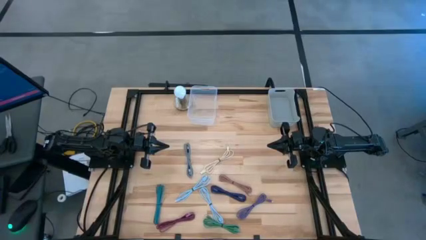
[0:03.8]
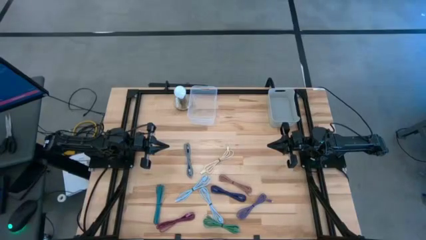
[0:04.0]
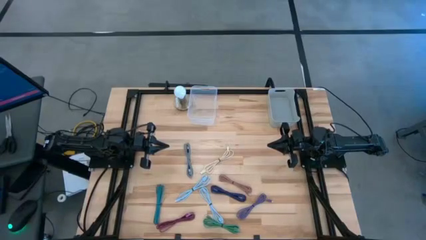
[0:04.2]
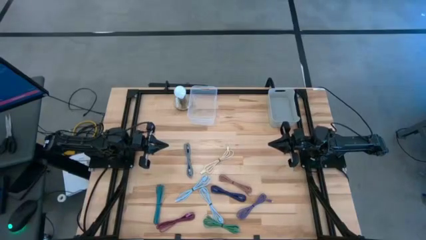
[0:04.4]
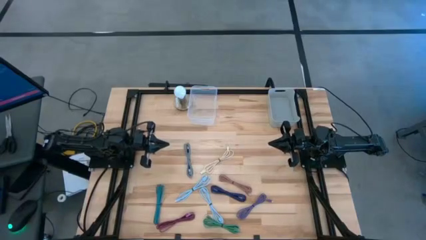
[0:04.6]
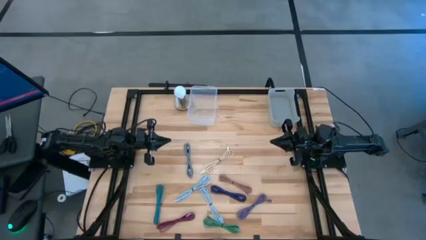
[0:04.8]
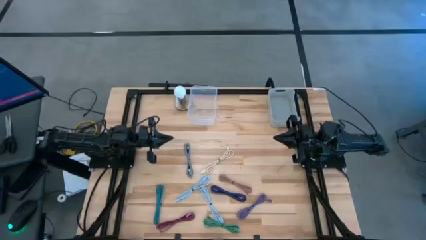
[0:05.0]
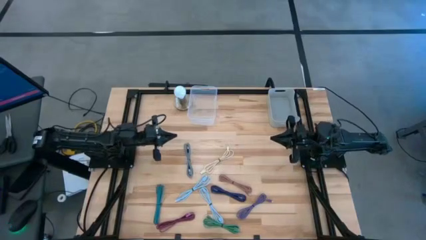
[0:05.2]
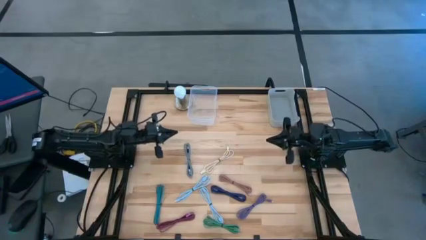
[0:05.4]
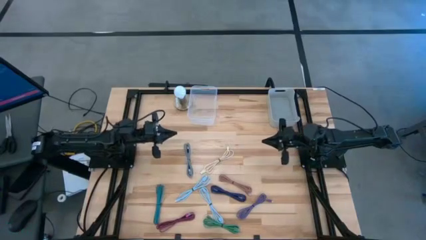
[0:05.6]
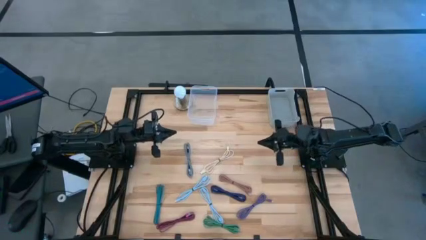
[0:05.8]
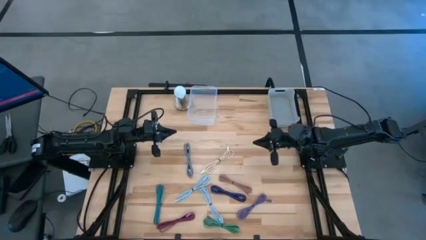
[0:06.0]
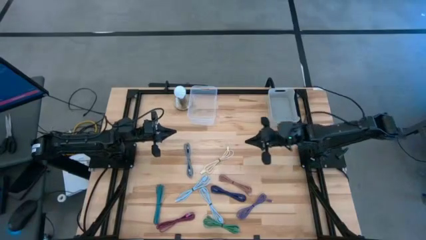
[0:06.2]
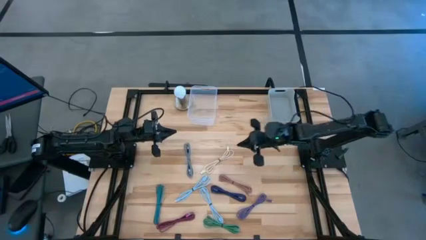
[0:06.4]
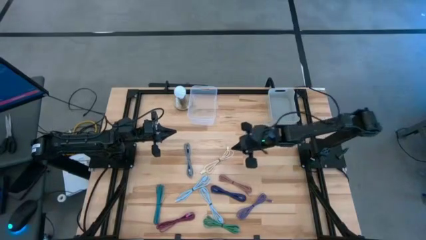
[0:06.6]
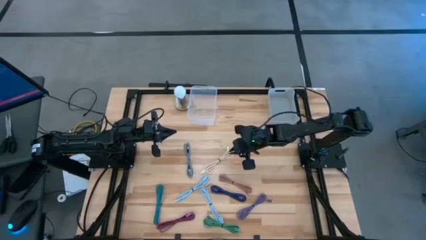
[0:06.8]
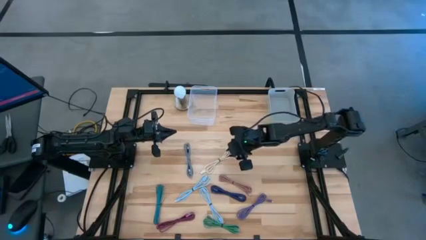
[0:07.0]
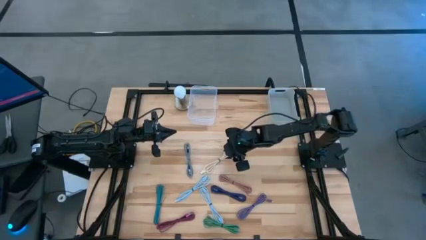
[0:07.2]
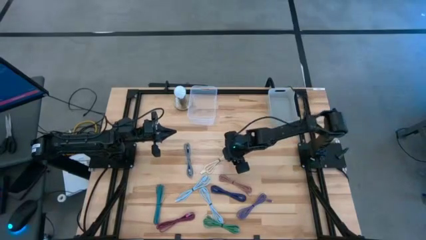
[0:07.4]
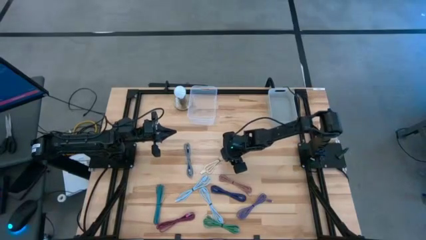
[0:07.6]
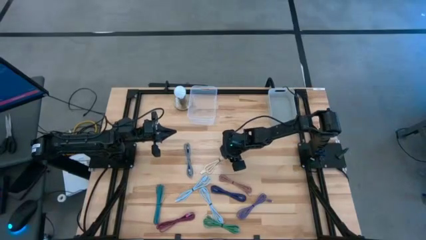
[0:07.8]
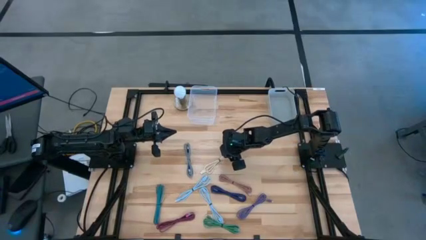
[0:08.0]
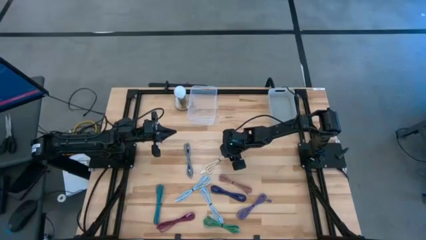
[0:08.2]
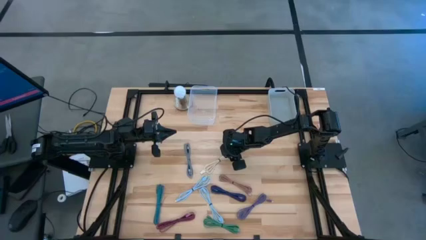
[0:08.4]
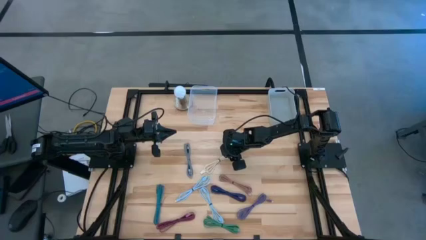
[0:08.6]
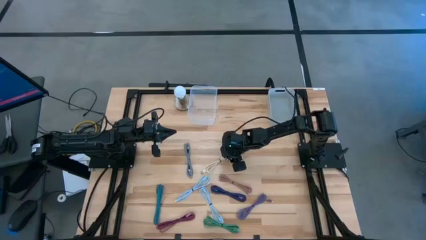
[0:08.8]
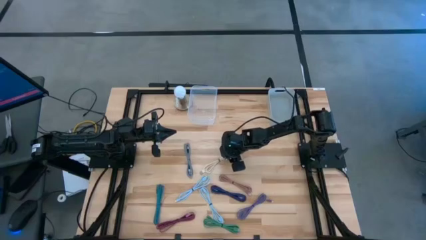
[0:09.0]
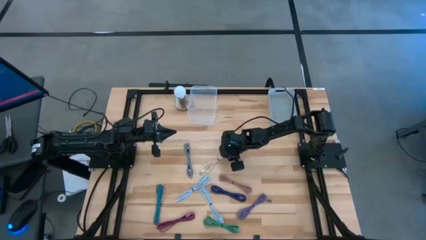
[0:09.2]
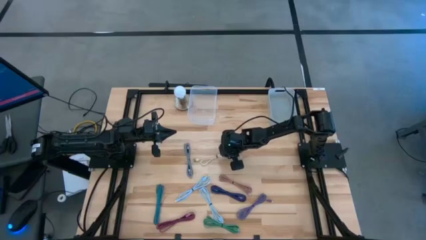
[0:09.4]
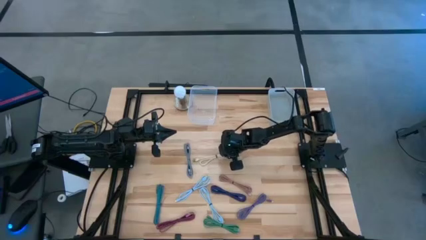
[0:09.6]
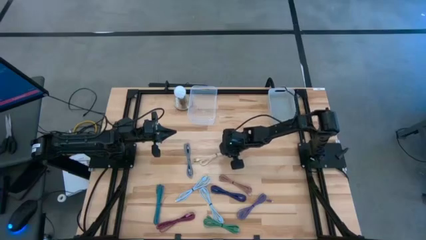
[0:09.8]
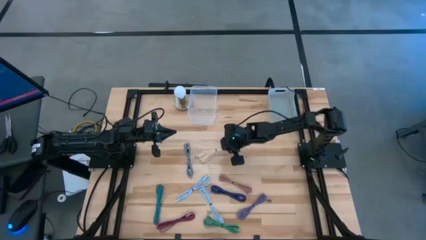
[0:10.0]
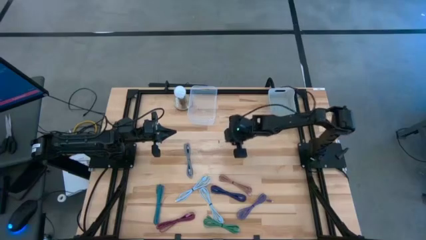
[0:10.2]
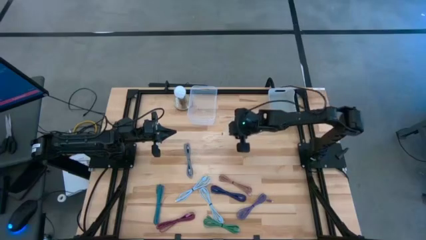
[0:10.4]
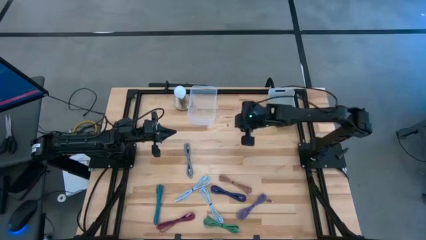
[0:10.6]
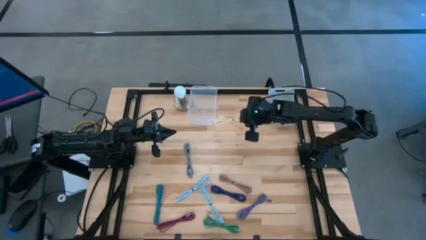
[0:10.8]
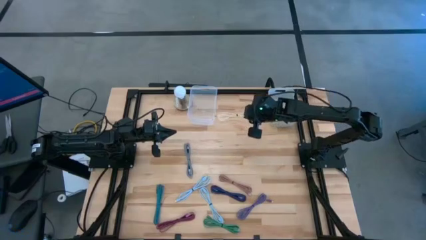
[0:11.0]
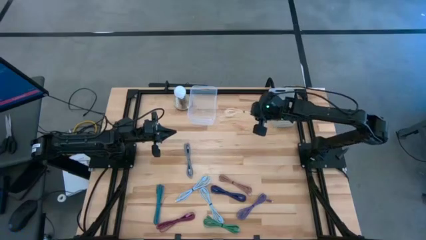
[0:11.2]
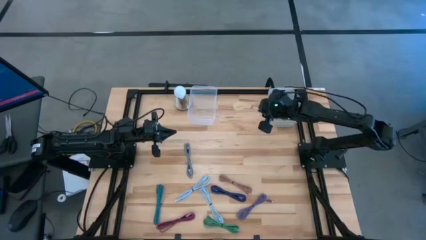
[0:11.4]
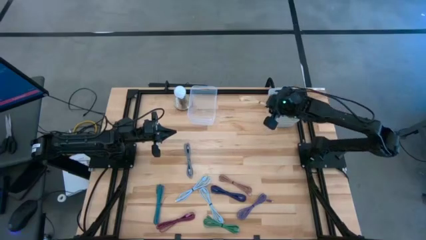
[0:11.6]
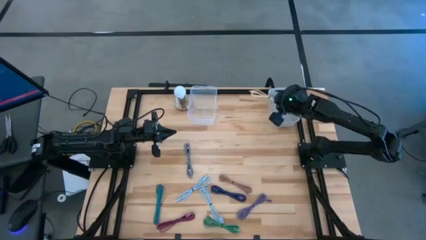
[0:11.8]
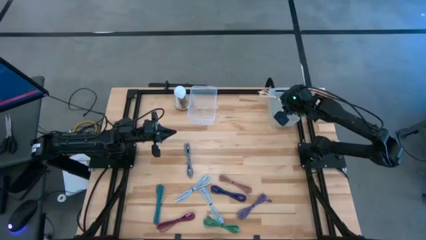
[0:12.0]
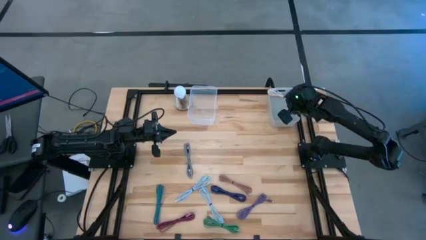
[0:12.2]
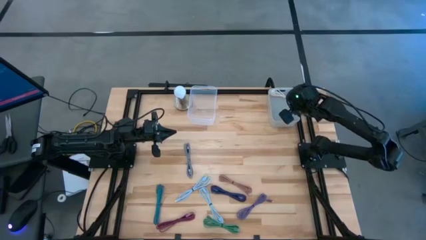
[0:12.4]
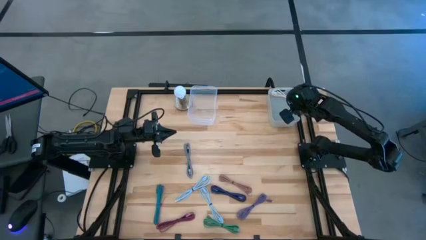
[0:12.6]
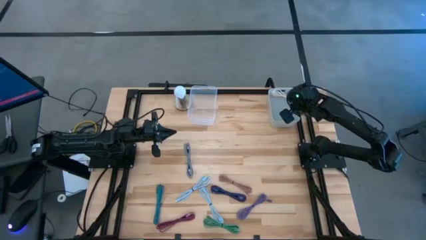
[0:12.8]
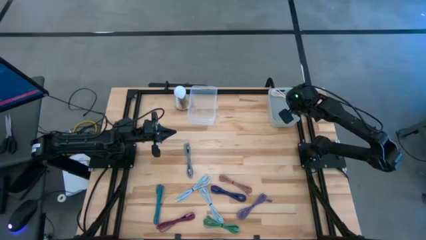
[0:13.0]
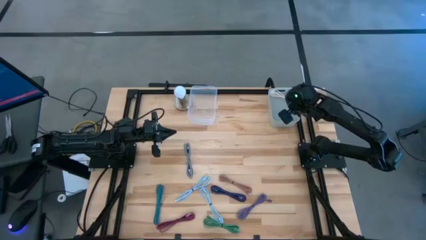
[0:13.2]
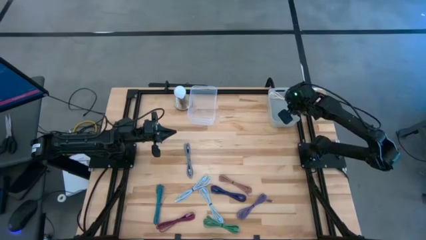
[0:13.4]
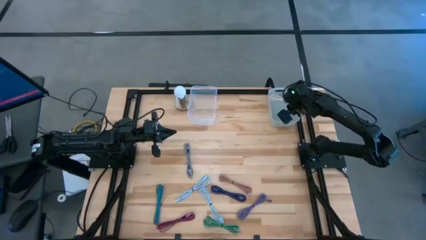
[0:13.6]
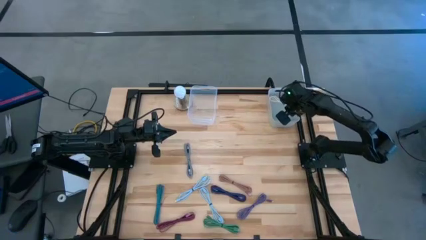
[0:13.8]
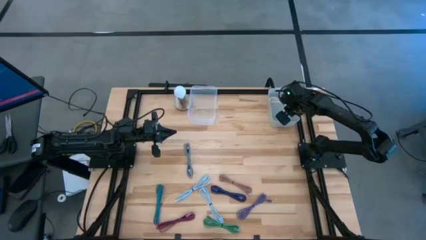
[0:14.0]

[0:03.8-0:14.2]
Task: Pick & Place USB Port
Put the white charger cable into the white bin

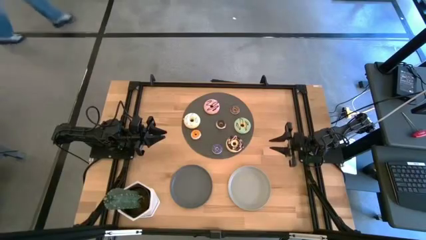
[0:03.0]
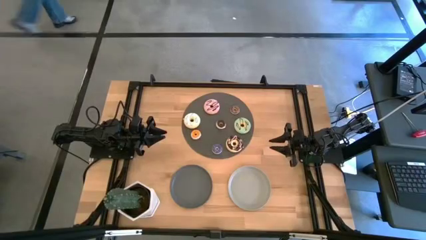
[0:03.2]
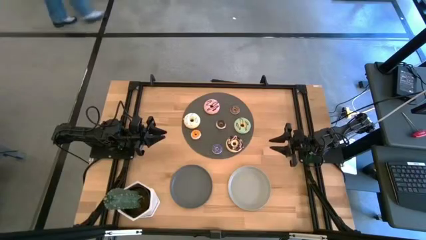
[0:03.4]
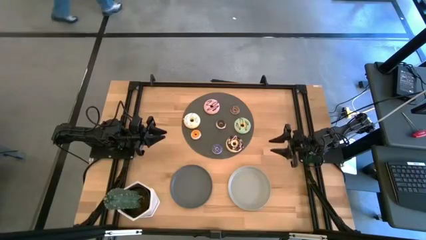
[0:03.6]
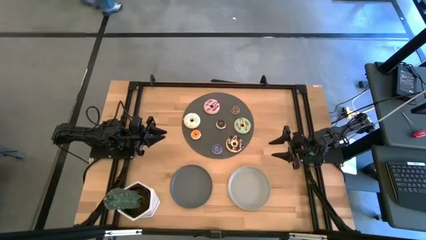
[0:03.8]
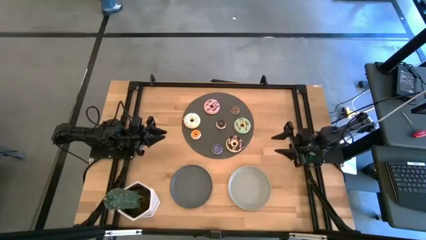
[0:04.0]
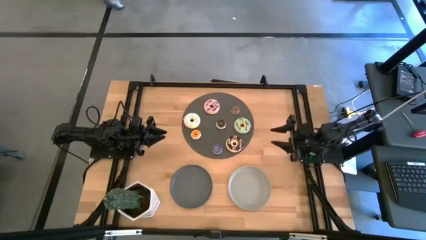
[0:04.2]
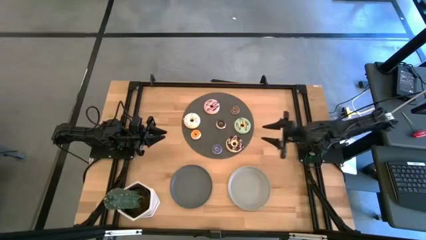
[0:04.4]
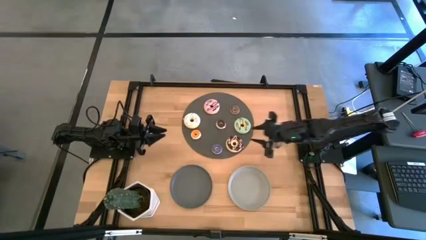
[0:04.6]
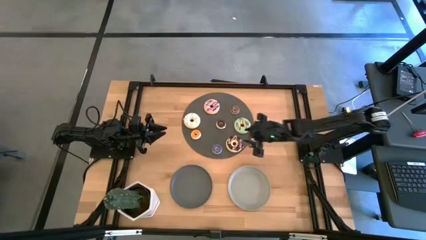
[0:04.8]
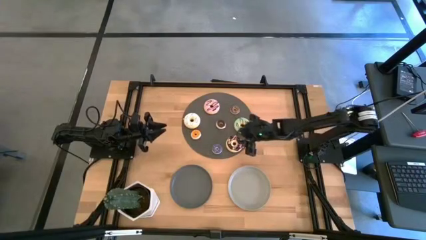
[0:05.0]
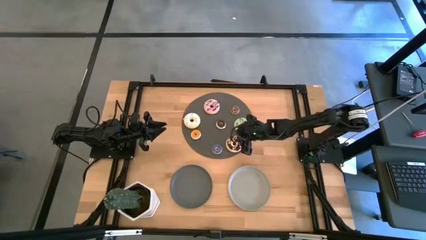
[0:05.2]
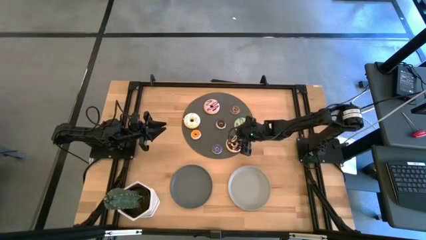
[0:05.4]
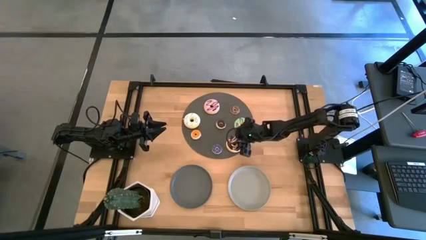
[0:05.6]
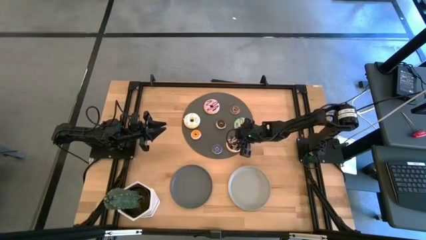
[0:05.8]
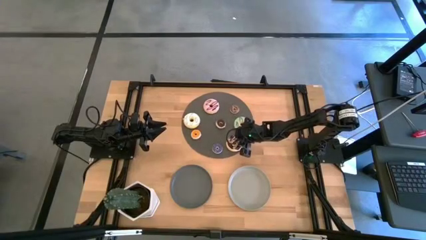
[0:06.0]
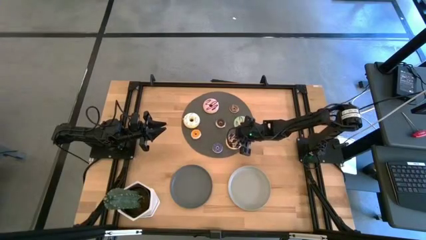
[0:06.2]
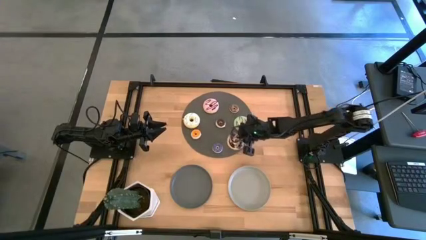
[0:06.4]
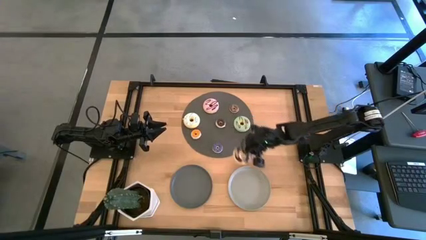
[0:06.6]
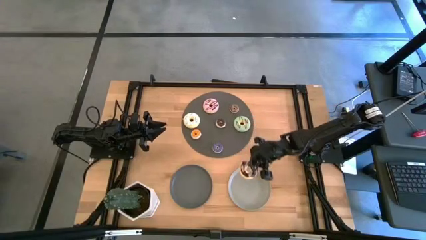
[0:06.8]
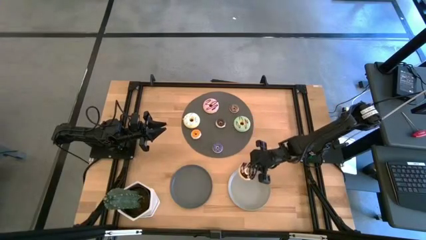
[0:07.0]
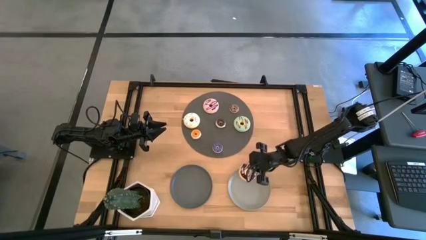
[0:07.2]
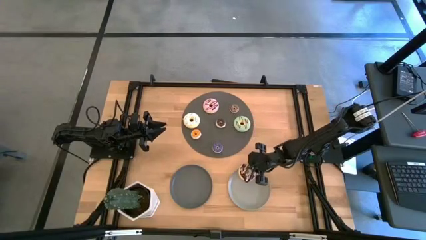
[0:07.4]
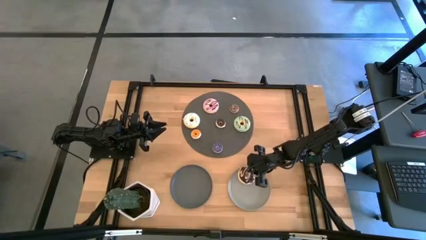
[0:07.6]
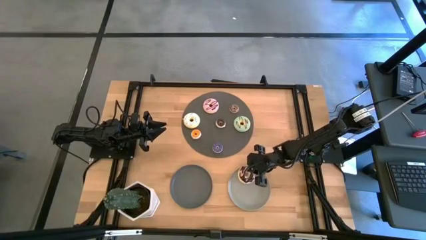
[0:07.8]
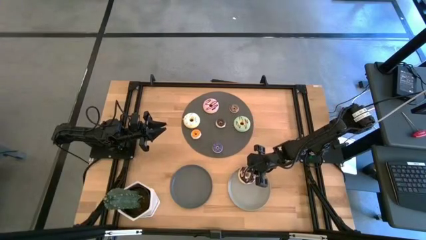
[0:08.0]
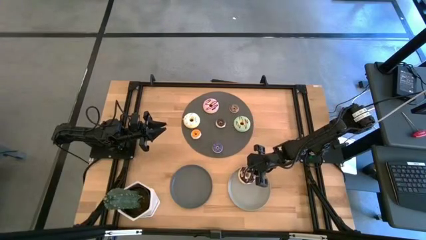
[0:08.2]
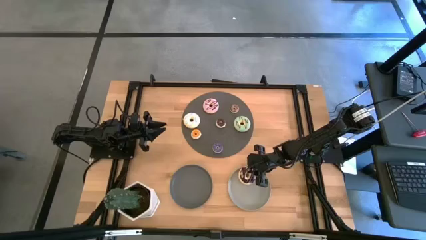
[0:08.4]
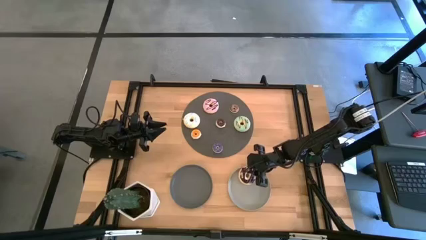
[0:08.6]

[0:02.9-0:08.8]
Task: Pick & Place donuts
Put large black donut on the gray plate
